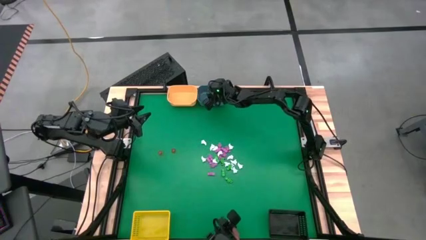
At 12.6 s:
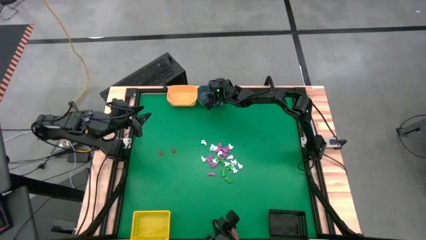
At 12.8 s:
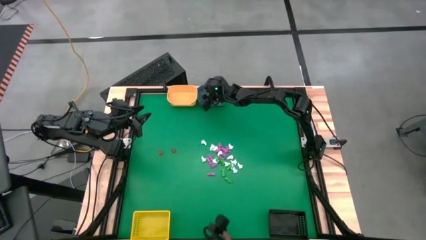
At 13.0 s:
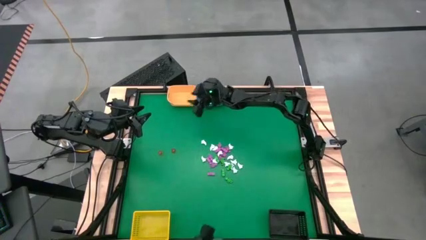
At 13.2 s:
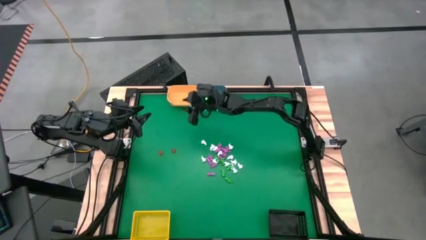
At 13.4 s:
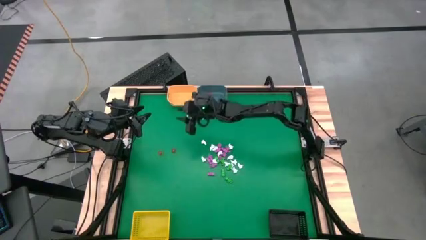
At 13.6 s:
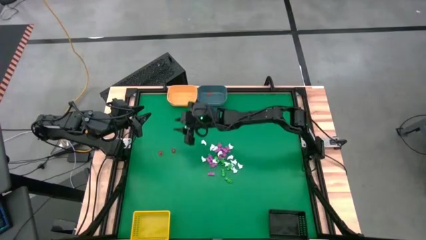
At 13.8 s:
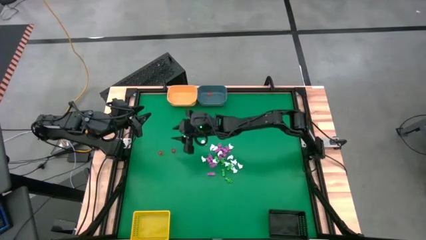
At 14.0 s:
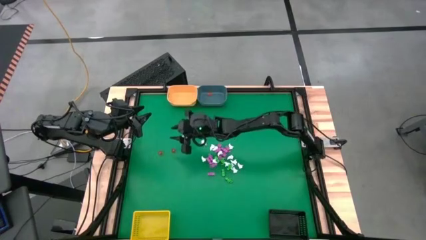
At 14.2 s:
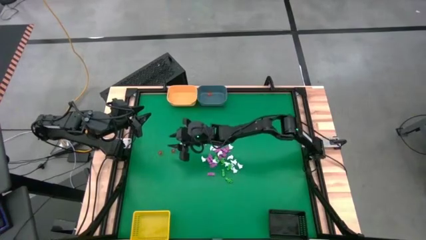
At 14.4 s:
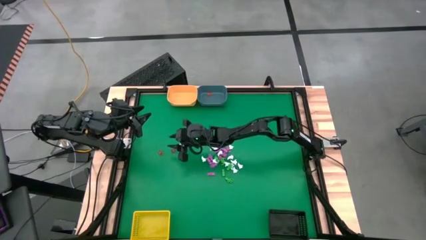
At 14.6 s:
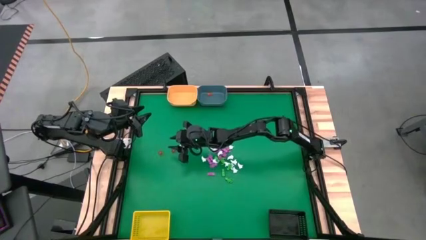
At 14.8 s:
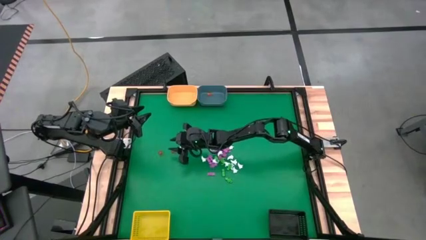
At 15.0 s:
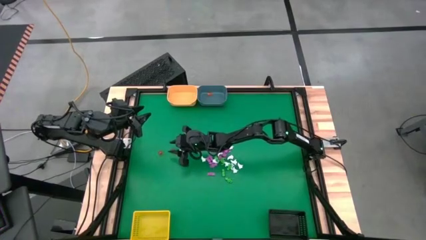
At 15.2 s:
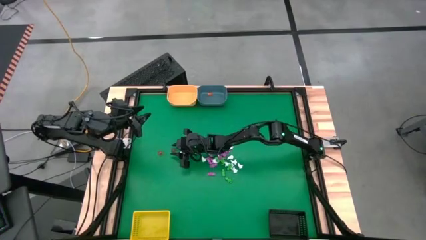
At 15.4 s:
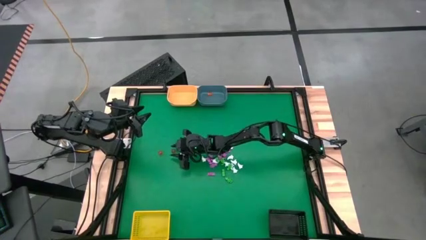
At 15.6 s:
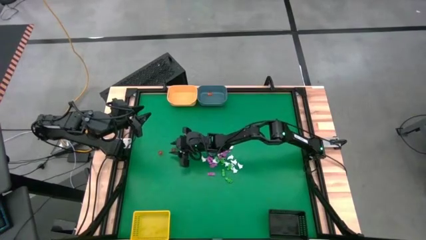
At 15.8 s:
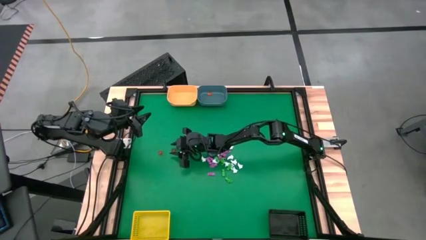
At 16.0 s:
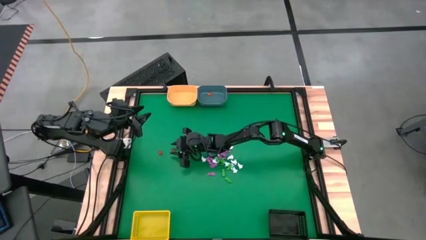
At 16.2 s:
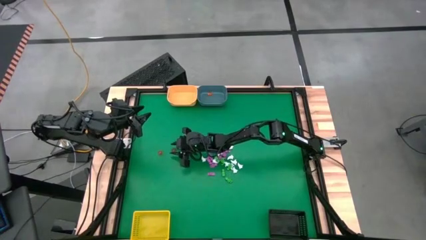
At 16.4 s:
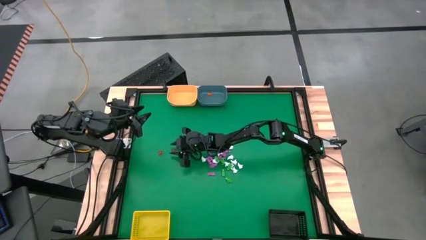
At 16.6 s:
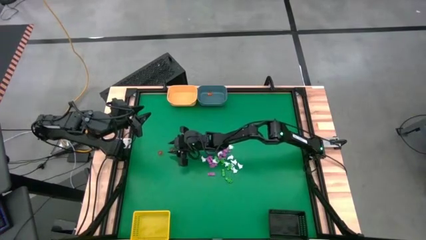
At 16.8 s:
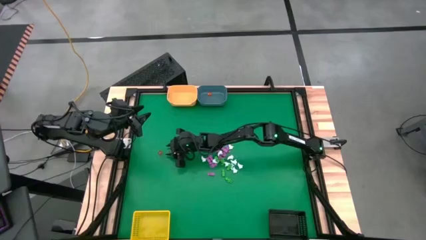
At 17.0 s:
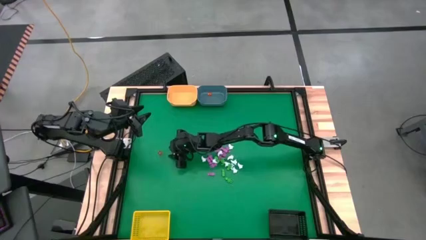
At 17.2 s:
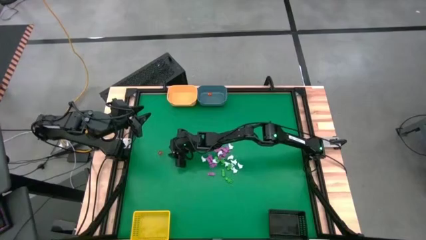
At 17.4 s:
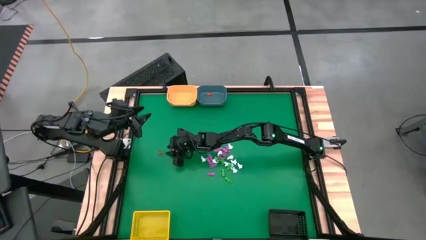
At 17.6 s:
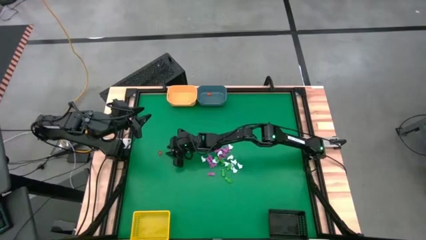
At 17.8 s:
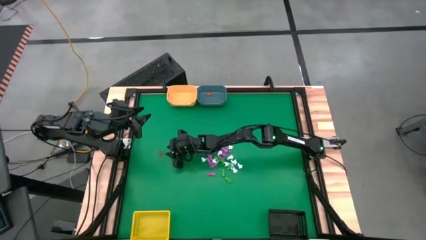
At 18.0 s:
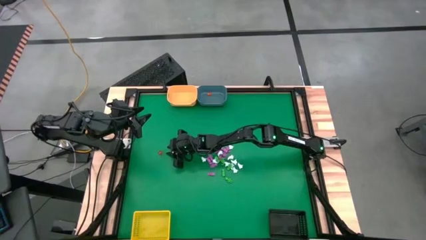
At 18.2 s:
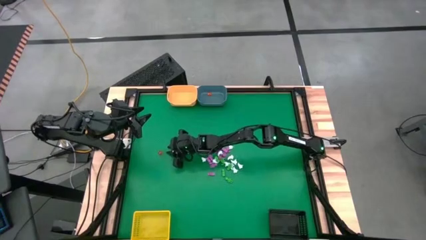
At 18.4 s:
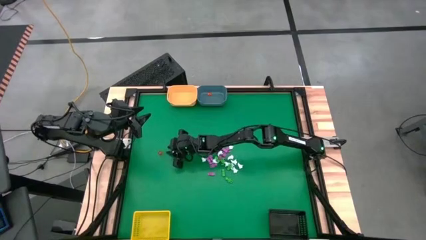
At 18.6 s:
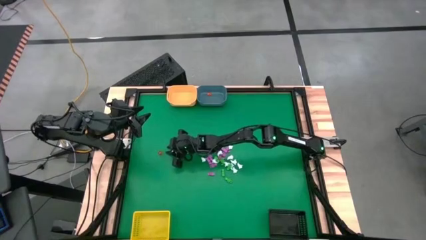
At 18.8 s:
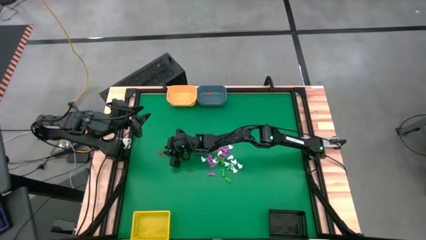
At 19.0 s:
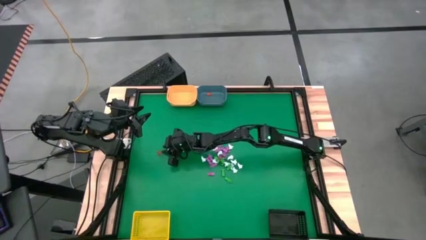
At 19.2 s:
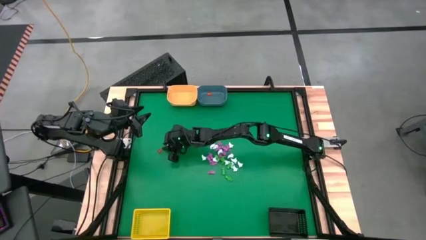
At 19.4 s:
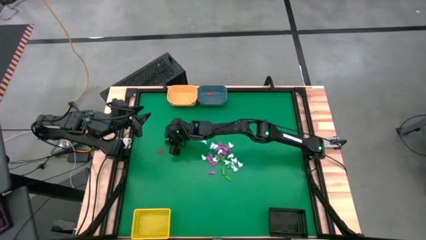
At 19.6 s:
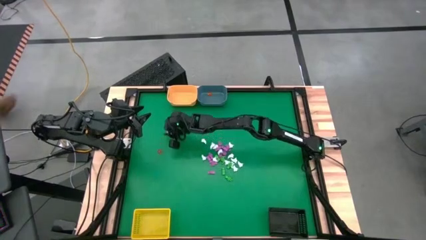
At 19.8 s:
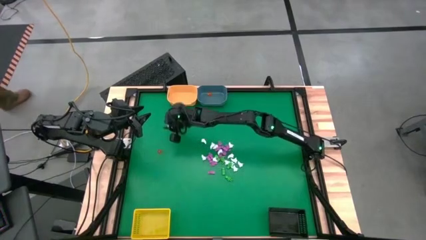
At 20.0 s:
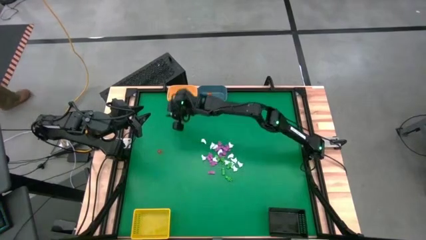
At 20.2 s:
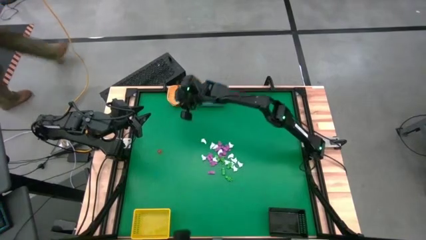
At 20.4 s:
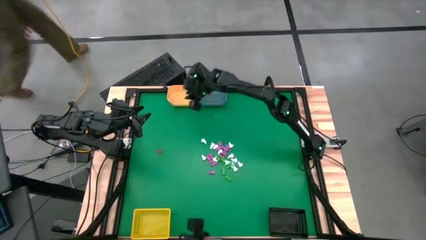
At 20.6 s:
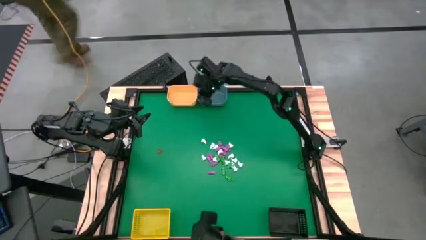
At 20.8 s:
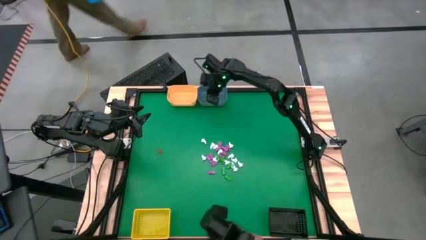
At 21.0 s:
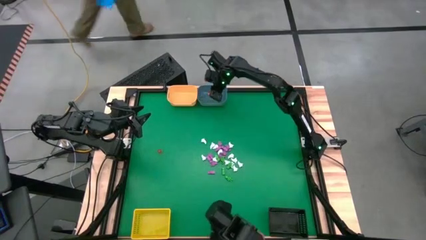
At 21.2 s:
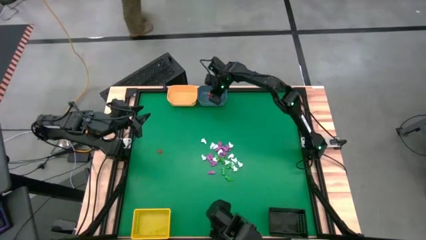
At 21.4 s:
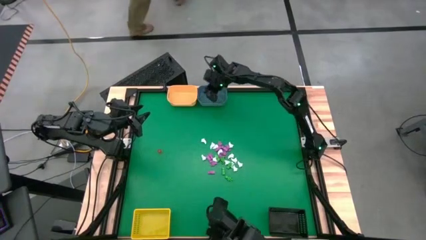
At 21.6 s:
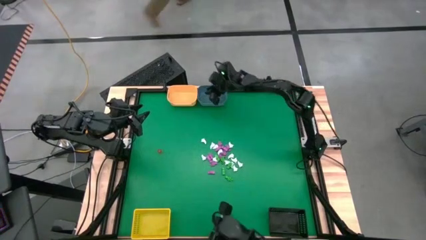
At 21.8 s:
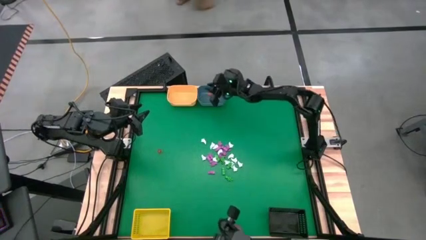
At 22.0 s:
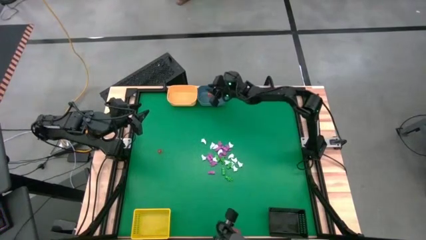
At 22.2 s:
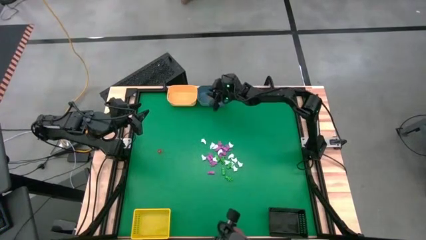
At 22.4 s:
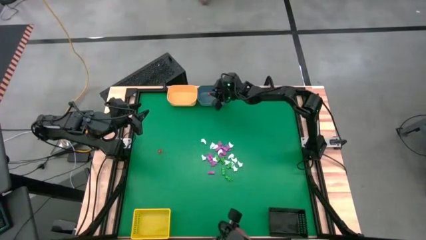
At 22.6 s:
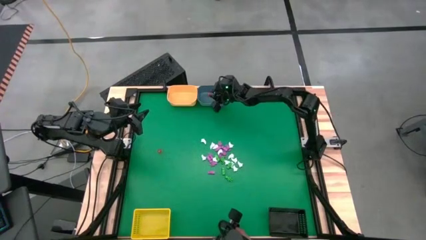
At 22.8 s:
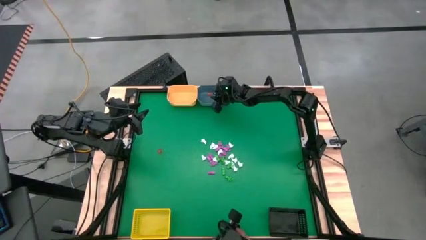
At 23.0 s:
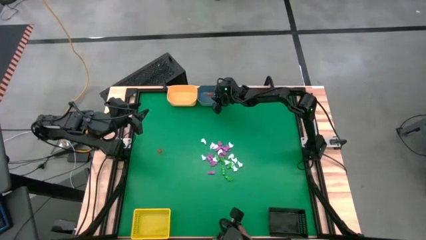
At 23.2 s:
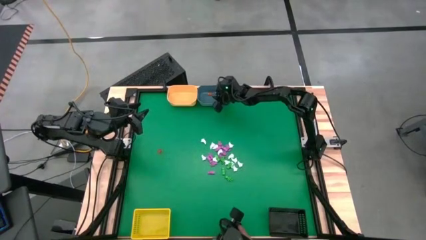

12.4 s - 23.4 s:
Task: Sort Halloween decoration
Put the orange pumpkin into the blue bin
